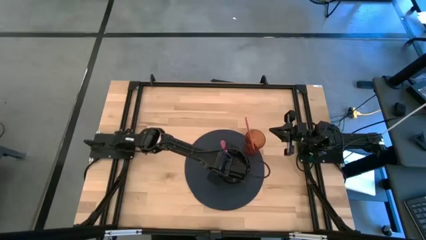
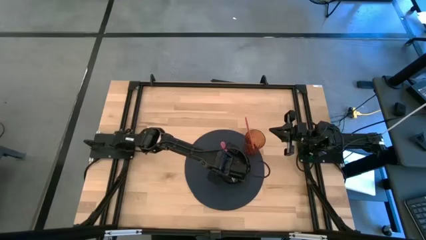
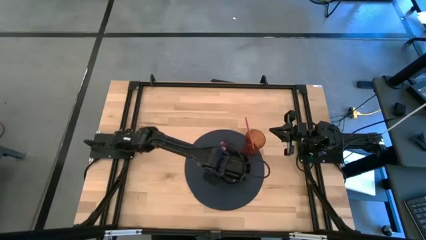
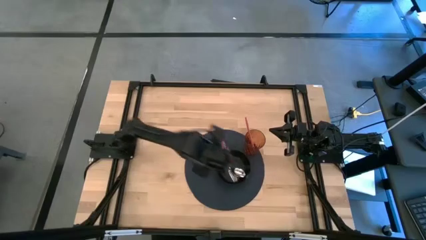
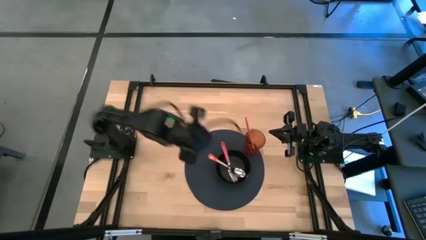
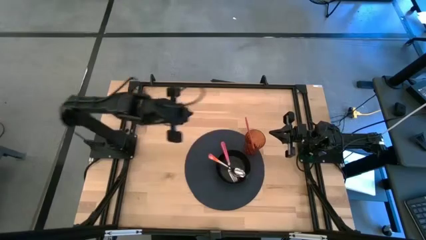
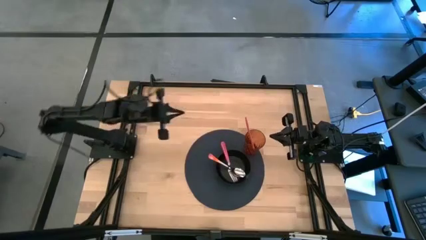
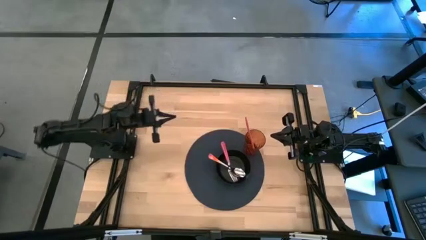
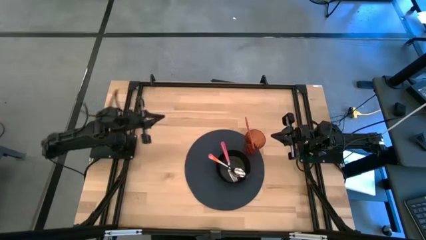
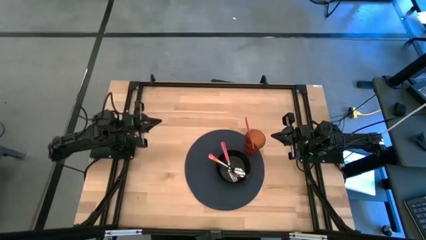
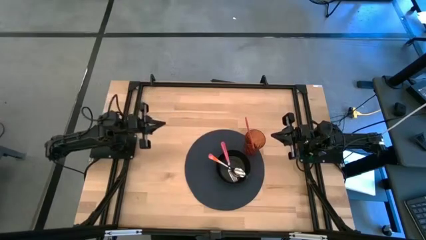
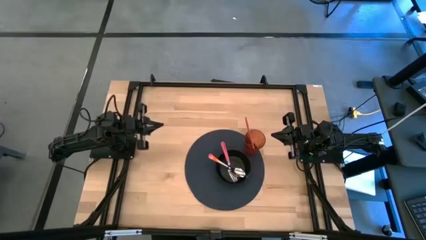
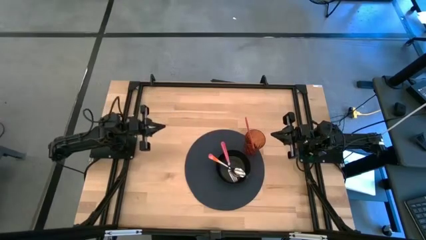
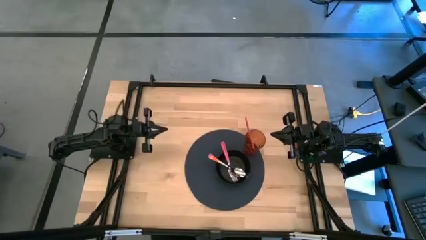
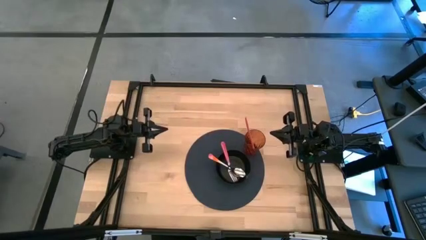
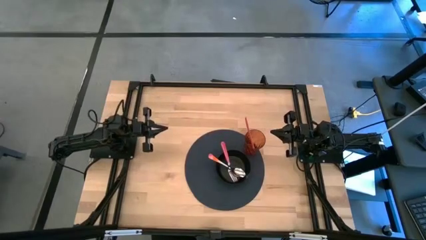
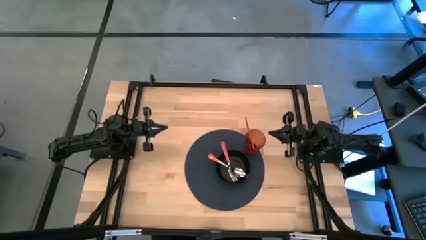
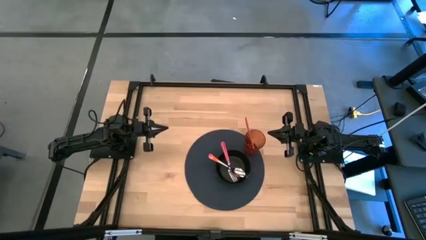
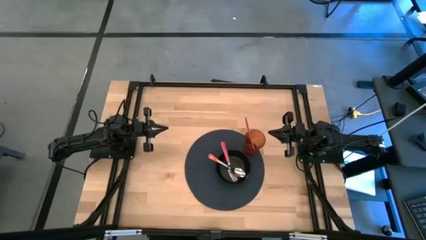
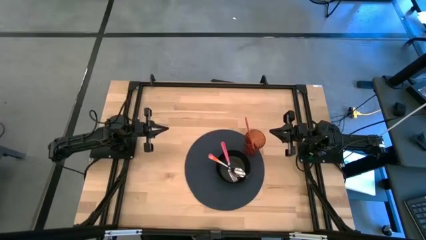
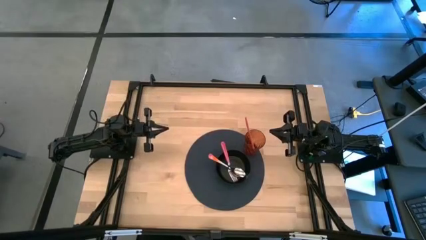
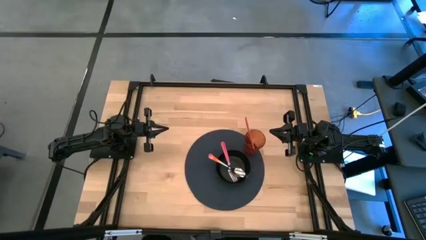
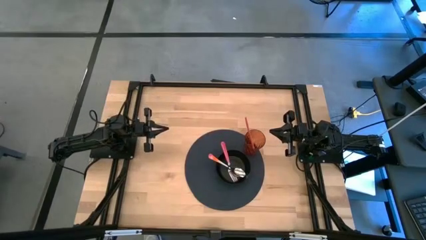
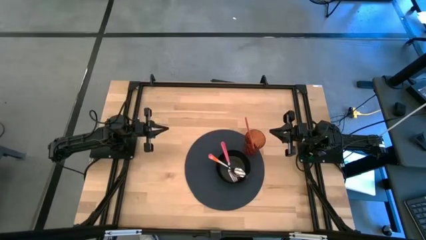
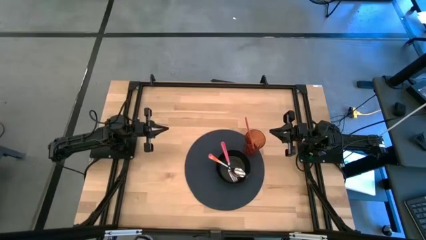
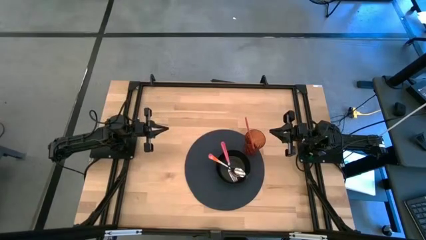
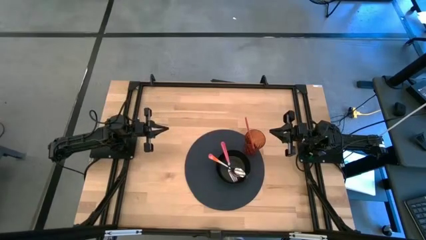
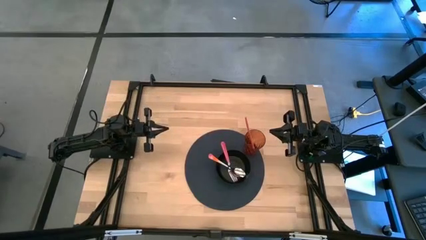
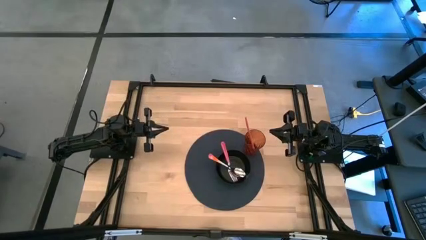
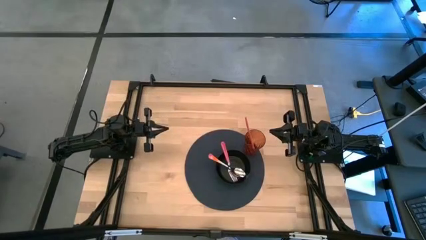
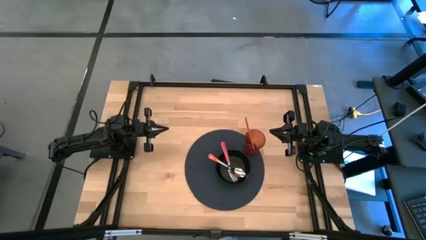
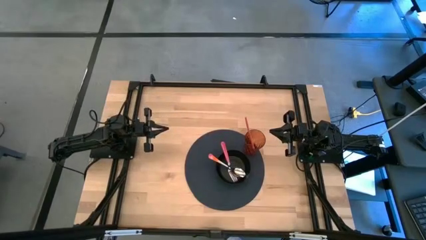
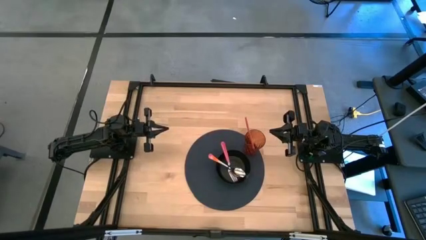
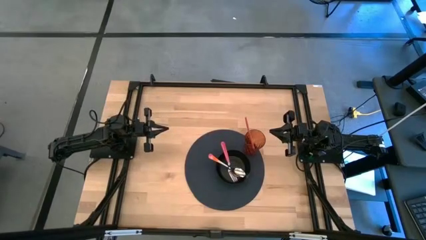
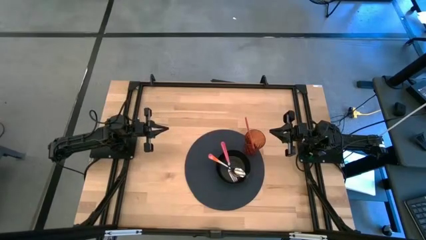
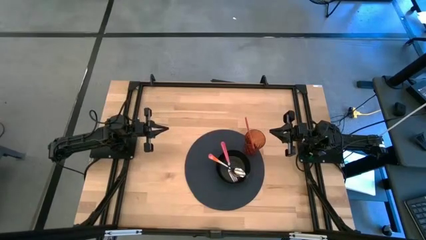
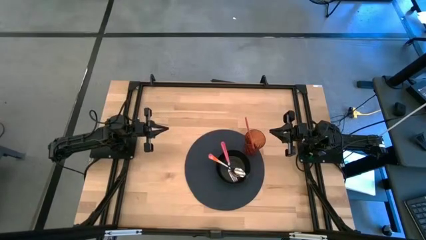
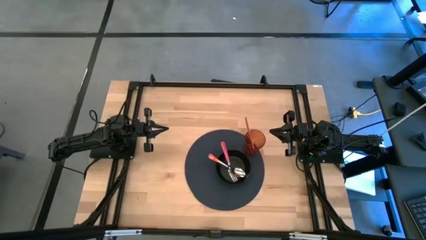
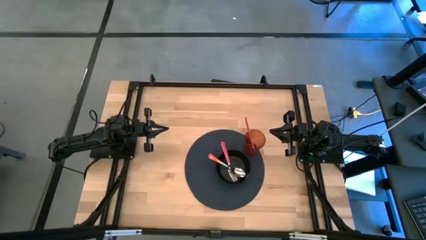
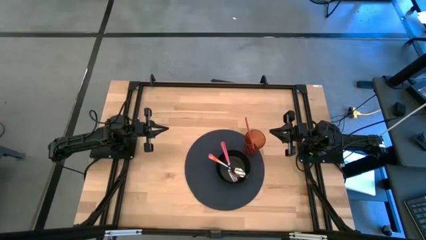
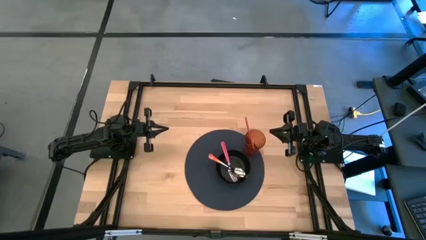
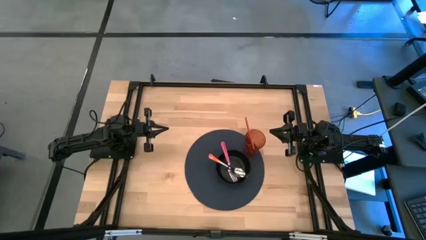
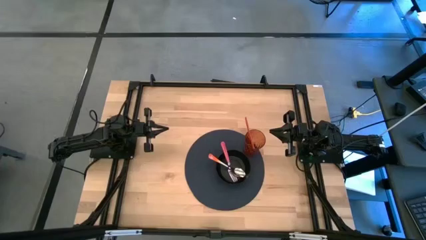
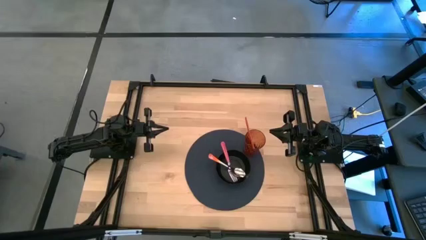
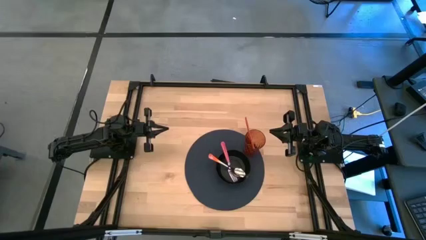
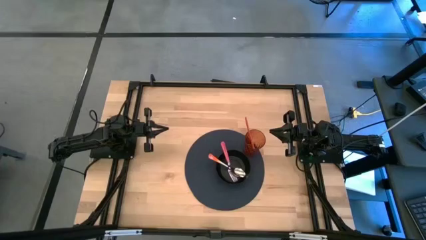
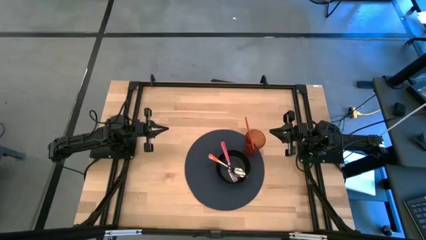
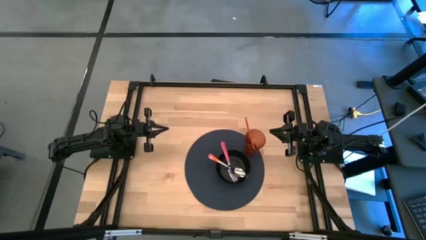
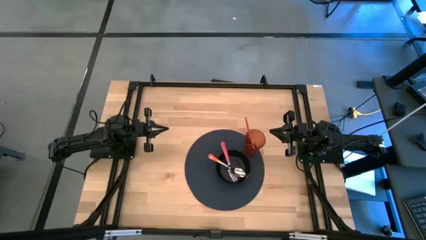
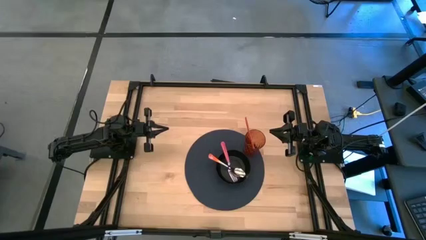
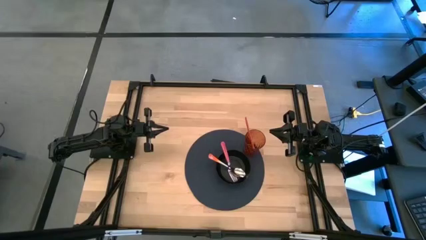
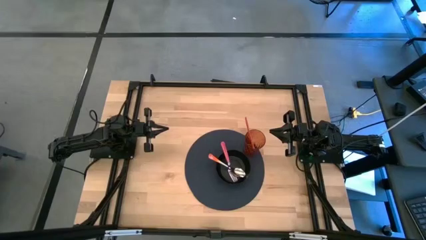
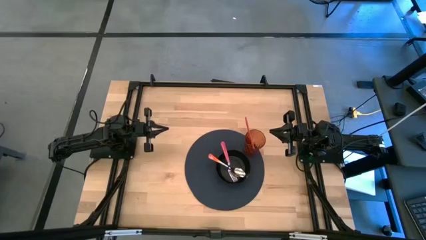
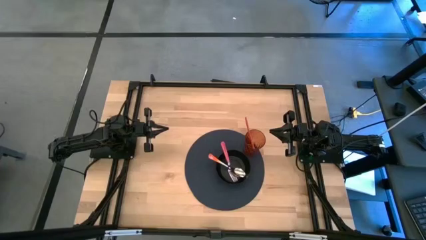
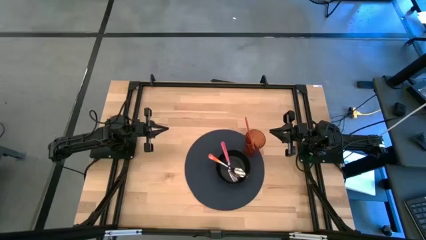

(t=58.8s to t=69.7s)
Task: Pick & Place Utensil
Return to Home Position

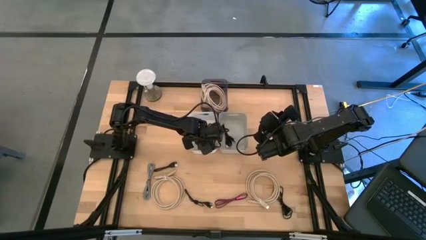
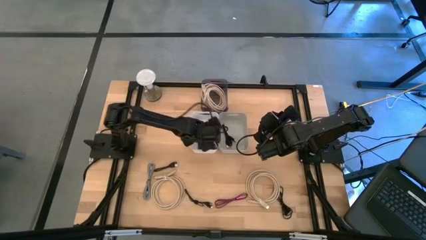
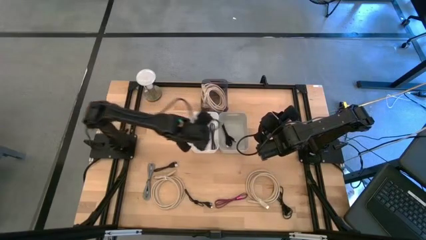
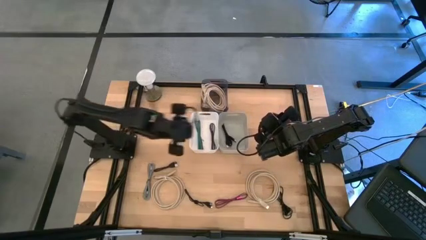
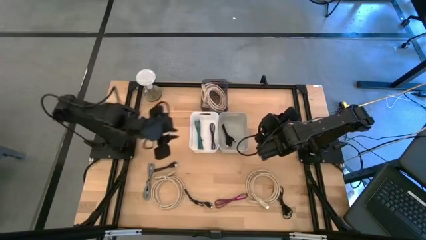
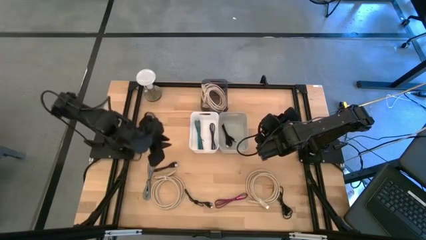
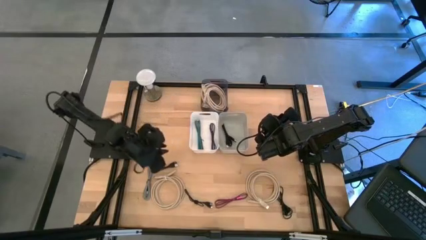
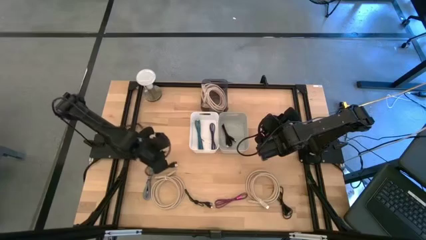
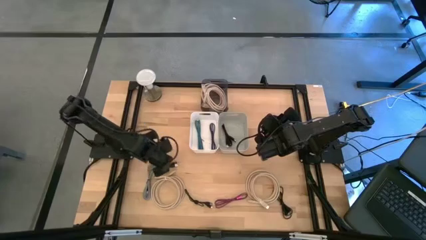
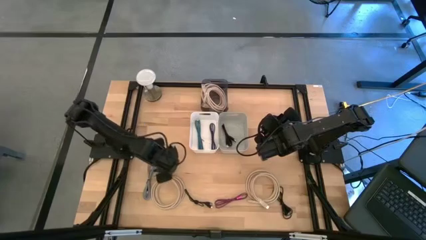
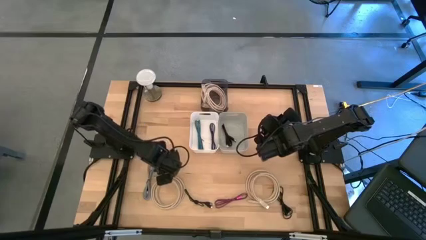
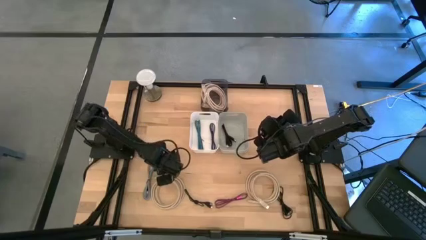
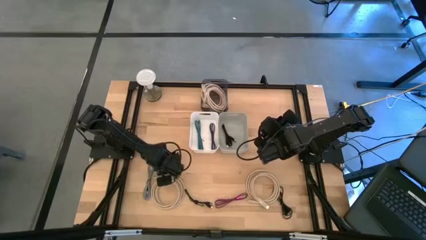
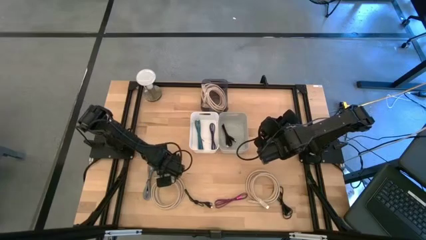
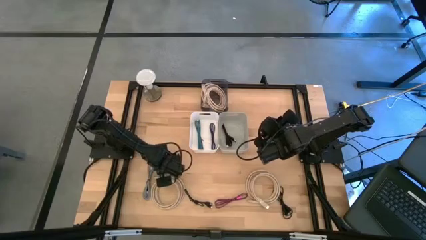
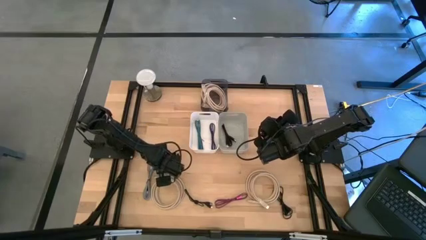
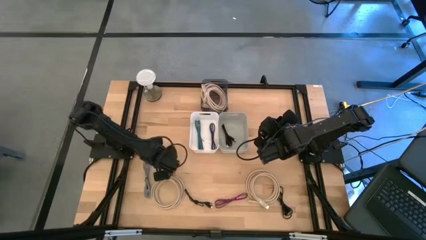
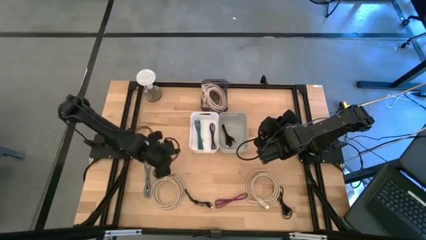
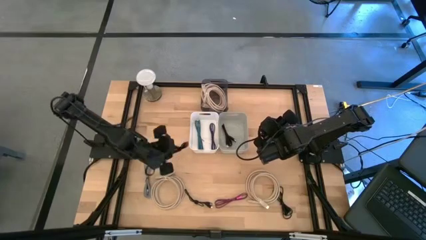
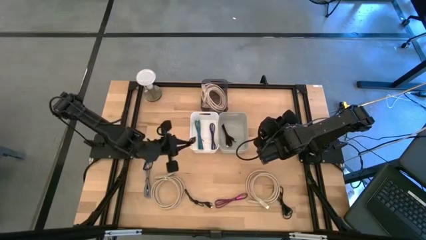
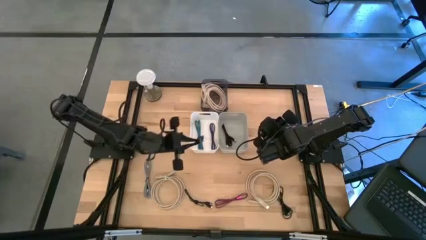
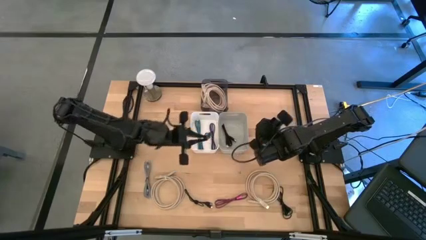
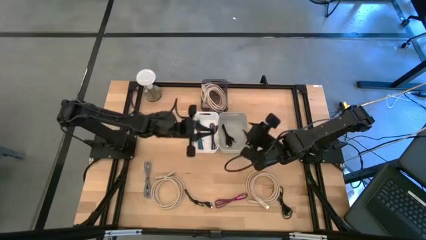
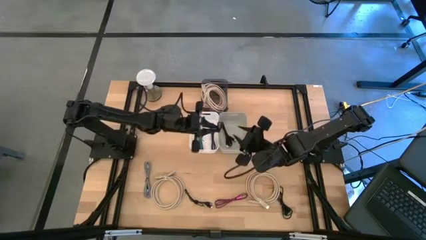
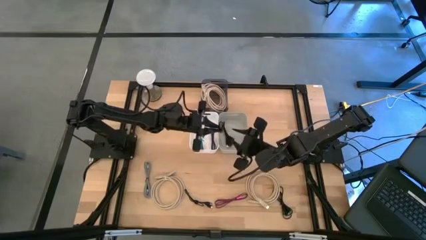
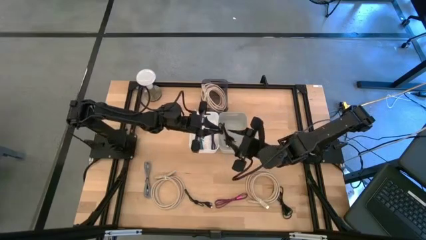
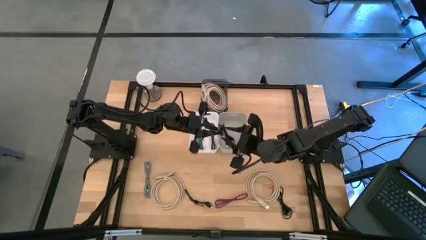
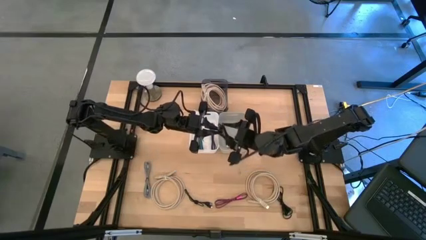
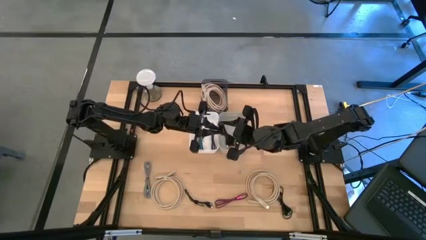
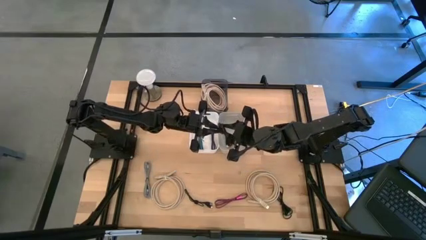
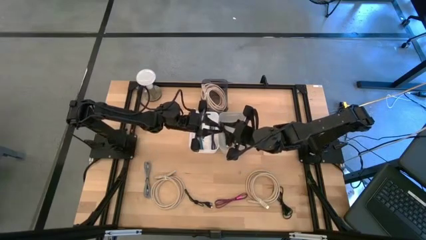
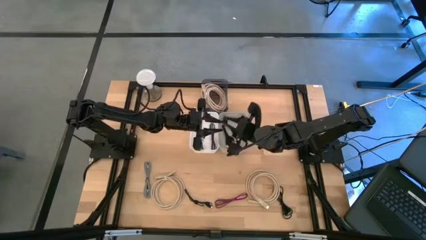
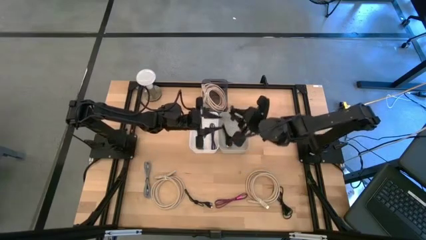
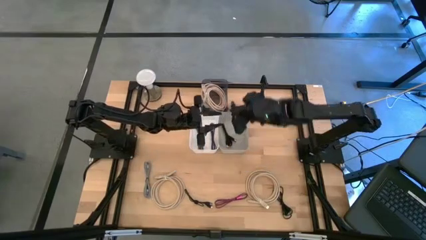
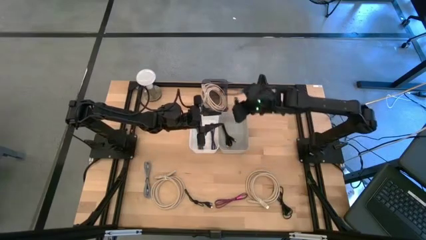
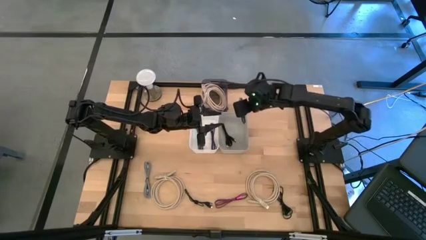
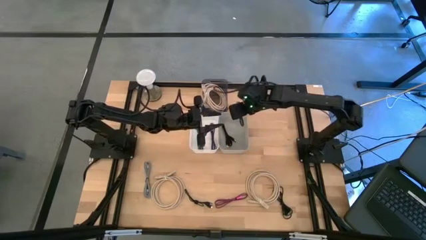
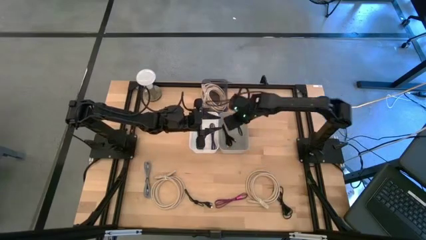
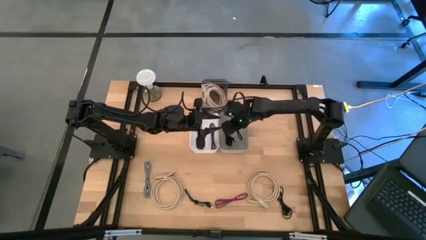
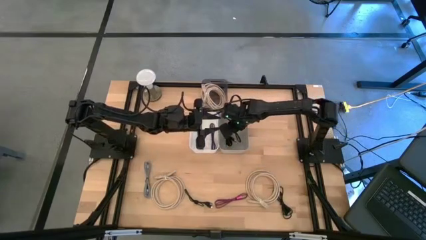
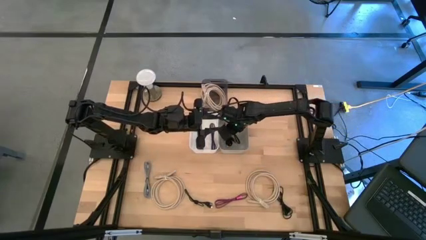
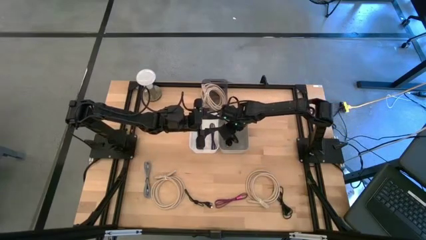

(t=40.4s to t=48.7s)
Task: Pick & Place USB Port
Put the black charger cable into the gray bin
